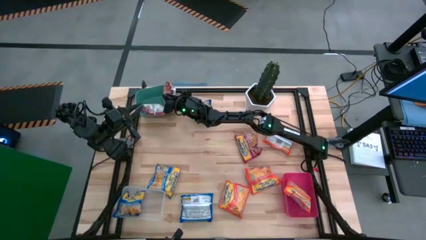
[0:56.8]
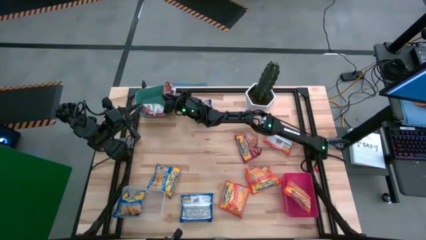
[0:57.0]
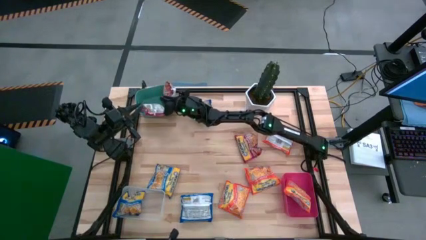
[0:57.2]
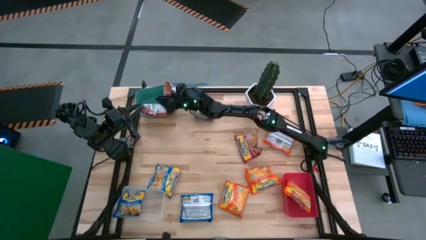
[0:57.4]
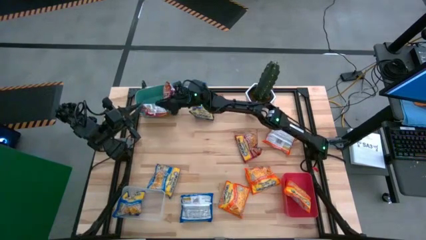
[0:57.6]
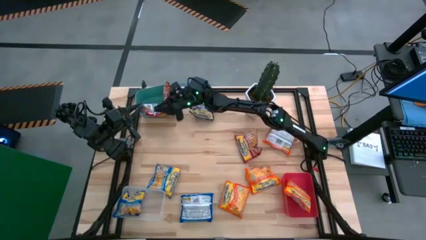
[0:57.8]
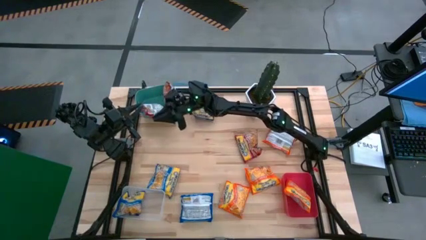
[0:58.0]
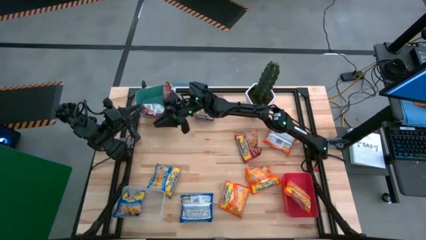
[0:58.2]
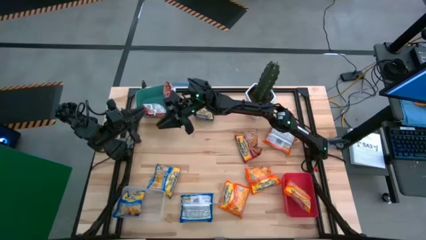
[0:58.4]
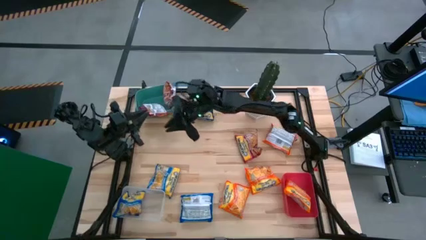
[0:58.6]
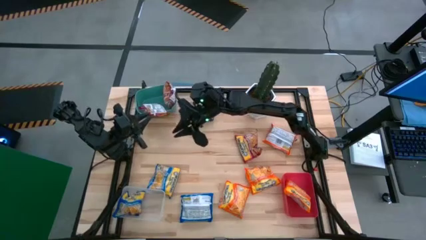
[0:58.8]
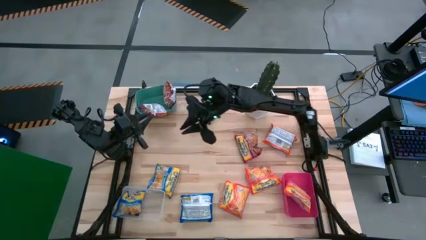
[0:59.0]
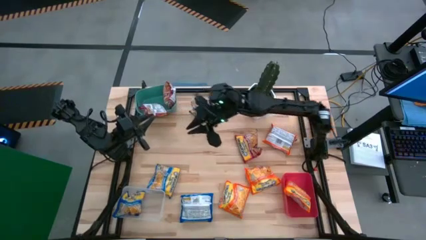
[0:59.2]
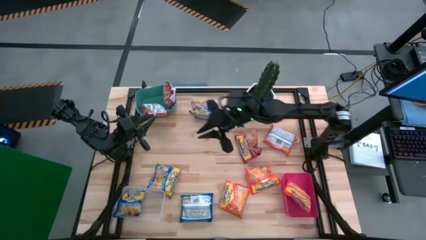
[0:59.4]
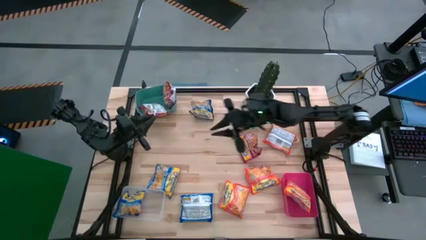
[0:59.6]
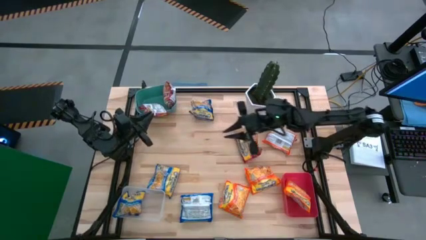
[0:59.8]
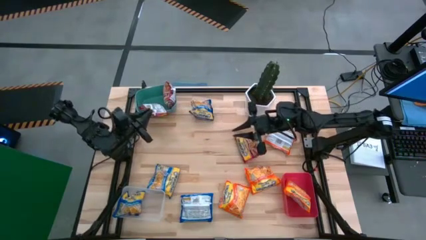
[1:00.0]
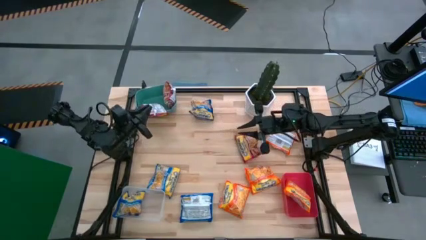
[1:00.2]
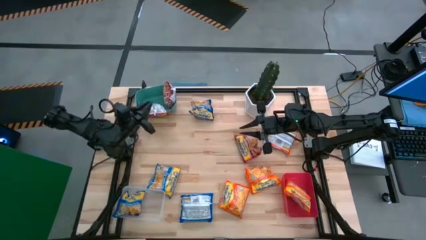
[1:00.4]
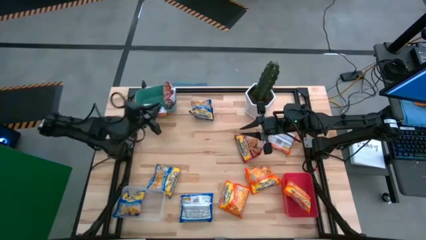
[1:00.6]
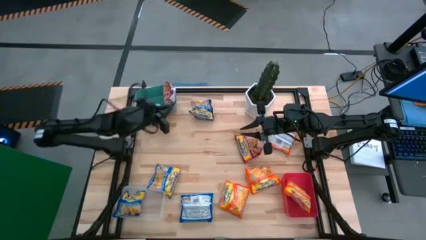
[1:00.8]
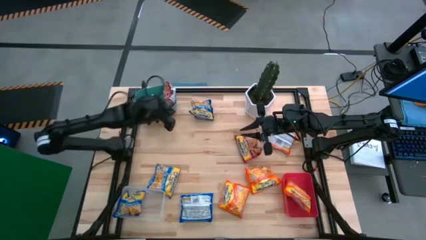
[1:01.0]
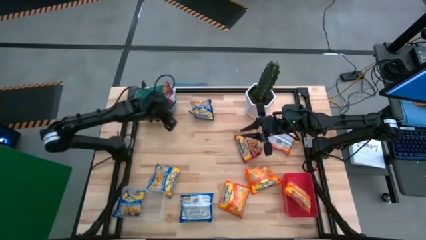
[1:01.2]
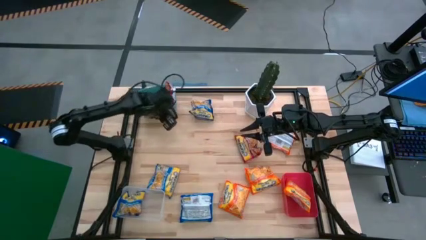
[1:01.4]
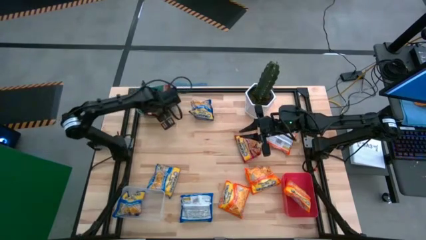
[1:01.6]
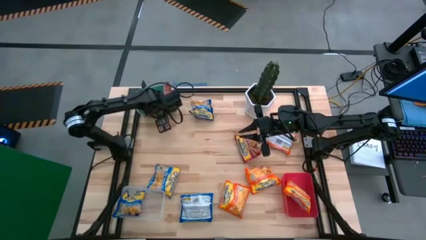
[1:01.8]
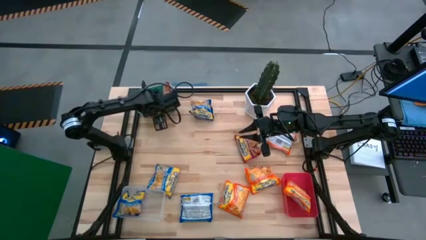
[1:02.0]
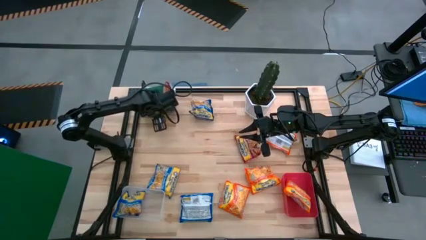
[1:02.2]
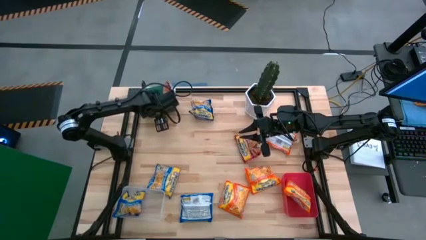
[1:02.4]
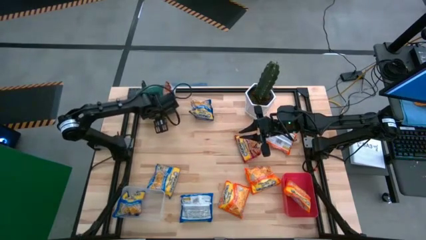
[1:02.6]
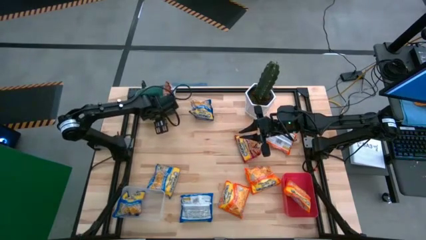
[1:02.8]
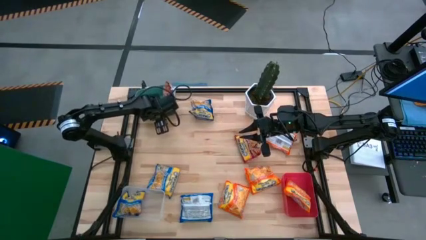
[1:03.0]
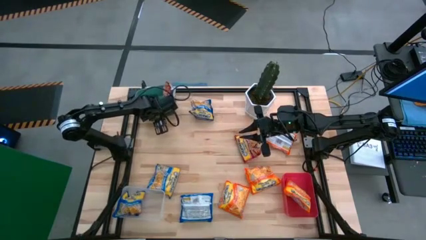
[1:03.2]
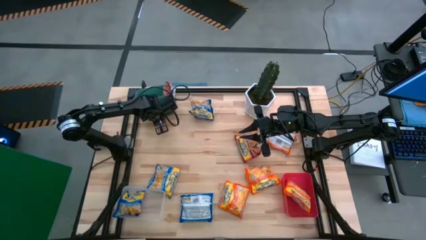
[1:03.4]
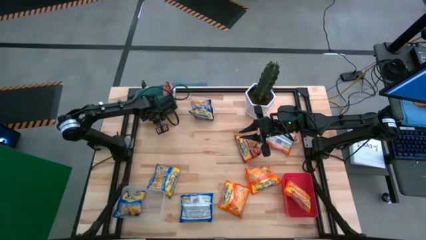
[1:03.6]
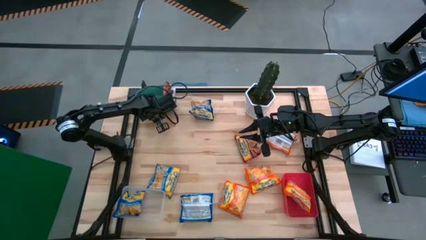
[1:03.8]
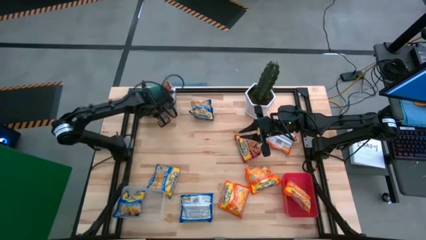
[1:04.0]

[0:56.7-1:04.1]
Task: Sort Maruchan noodles
Adjust the red noodle pack on the green bin

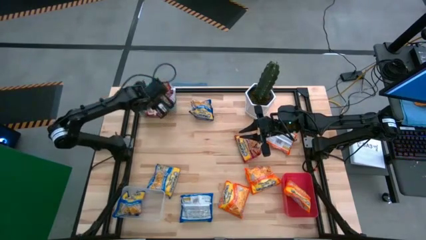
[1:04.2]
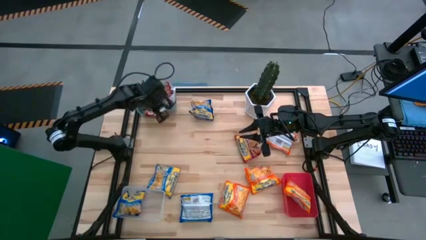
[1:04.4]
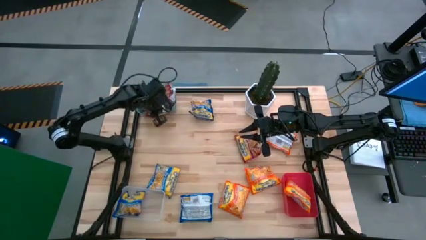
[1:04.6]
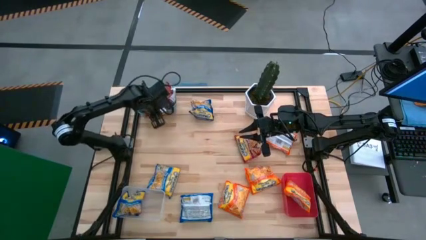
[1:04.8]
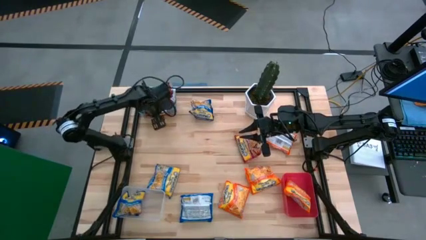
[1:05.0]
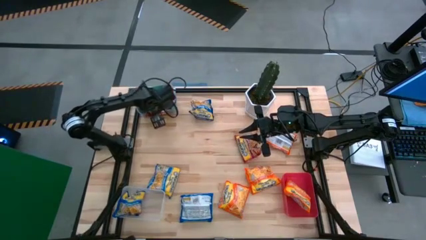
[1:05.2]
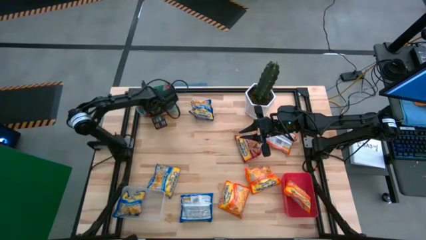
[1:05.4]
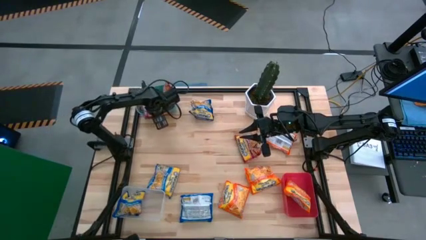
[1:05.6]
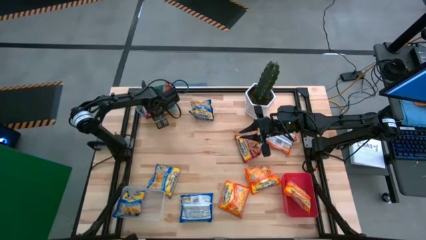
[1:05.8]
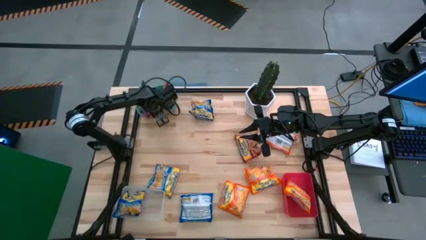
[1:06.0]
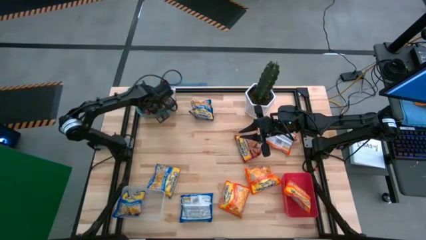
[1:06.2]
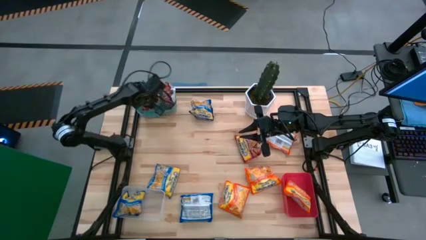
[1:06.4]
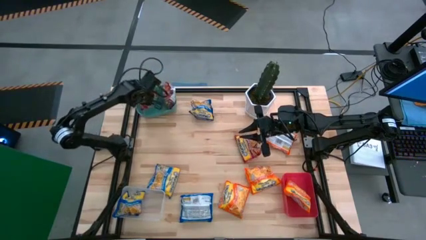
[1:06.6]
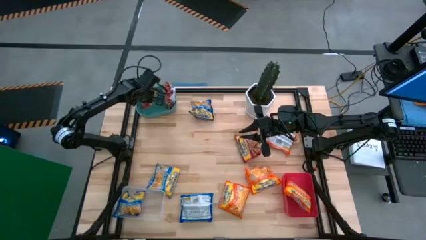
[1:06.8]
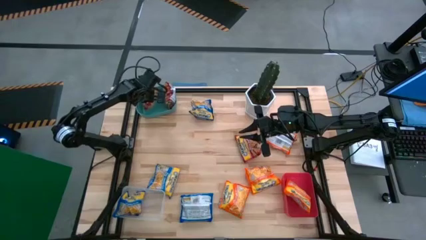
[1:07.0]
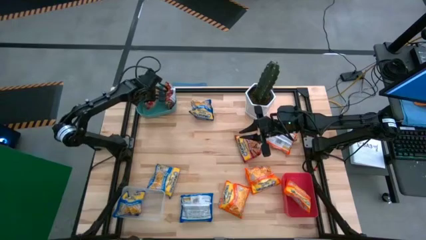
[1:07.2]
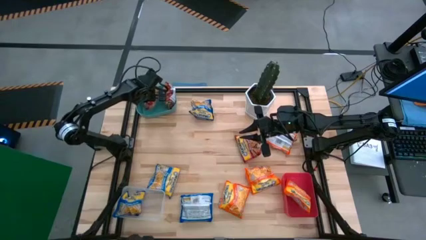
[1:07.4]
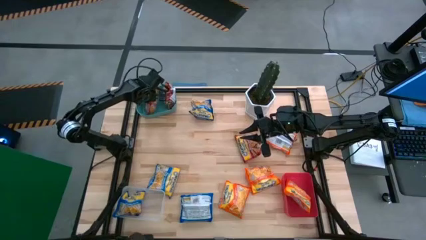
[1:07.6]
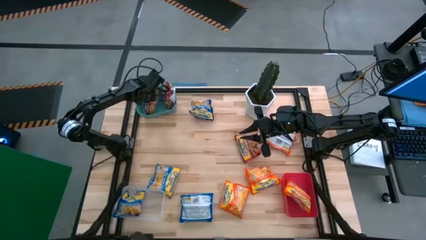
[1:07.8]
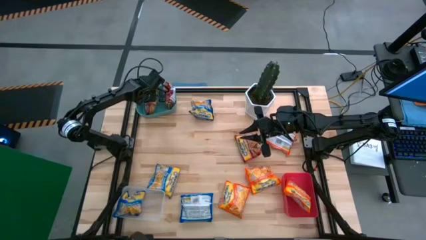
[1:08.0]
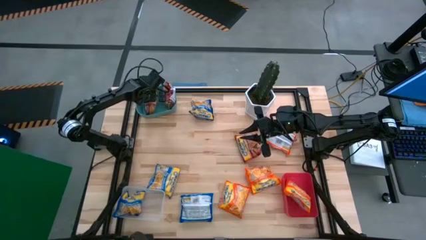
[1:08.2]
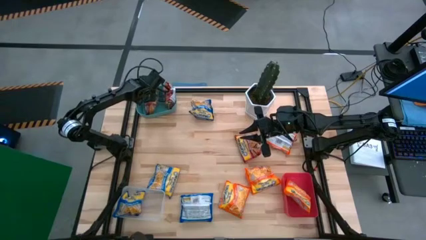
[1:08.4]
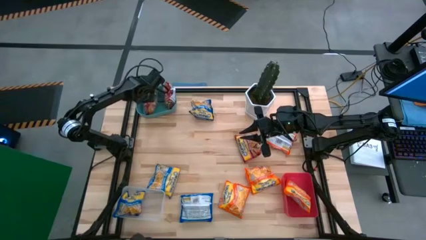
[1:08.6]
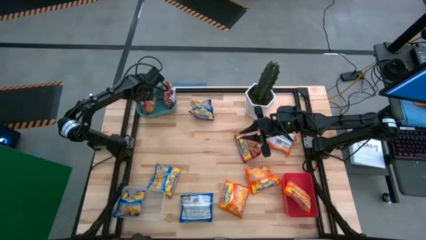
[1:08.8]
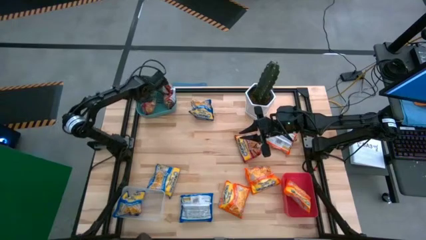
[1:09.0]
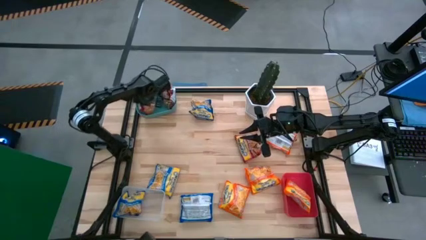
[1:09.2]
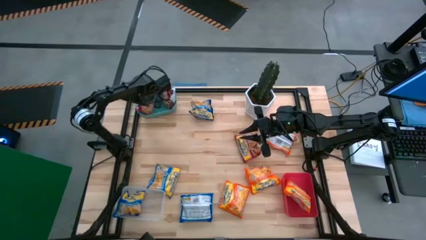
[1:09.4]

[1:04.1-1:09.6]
Adjust the red noodle pack on the green bin

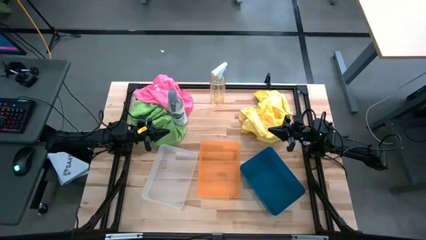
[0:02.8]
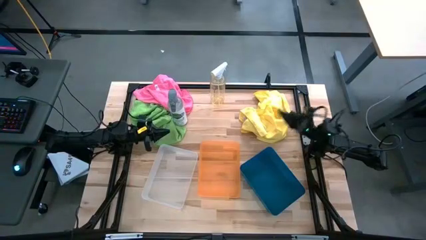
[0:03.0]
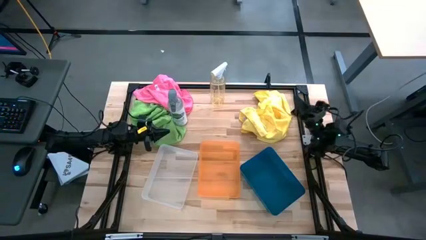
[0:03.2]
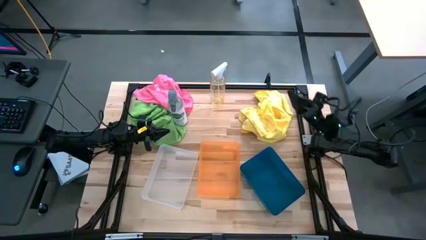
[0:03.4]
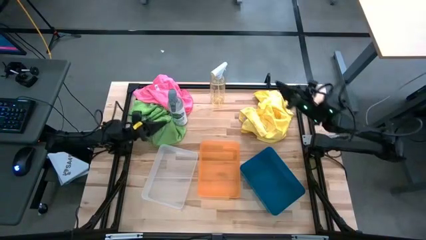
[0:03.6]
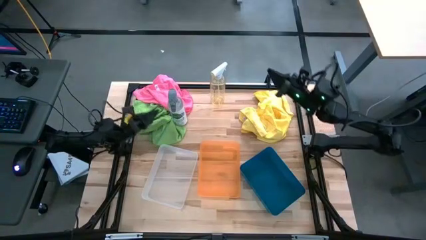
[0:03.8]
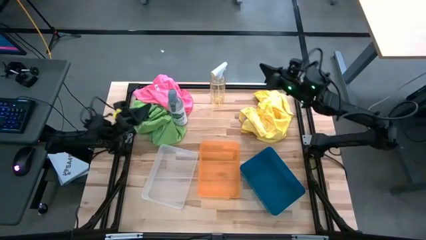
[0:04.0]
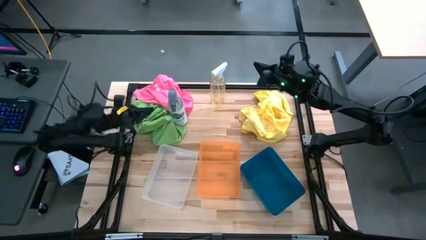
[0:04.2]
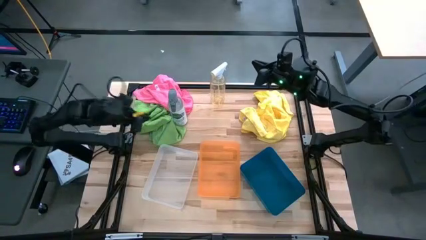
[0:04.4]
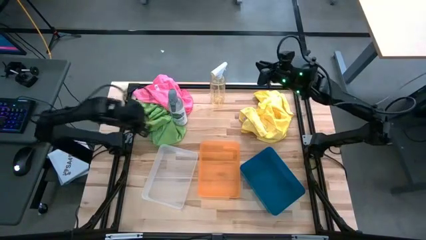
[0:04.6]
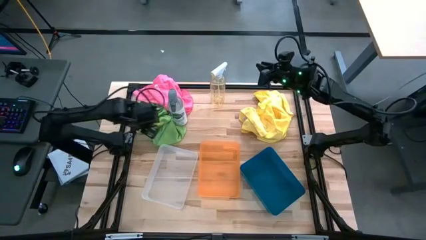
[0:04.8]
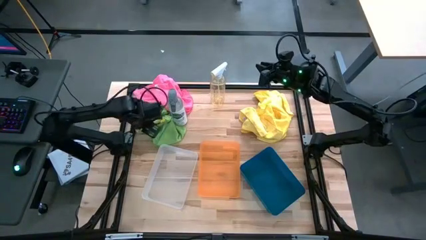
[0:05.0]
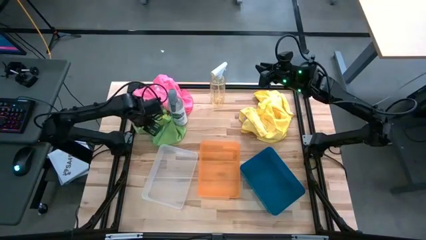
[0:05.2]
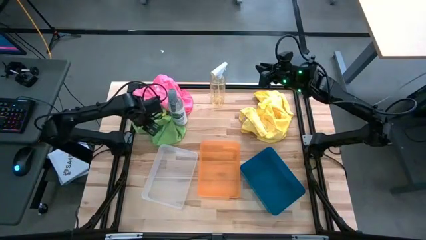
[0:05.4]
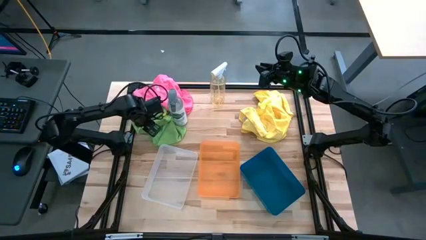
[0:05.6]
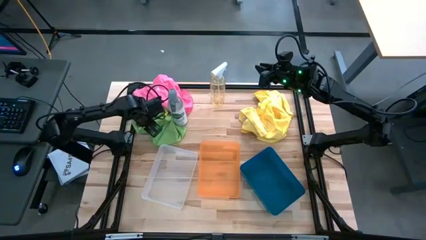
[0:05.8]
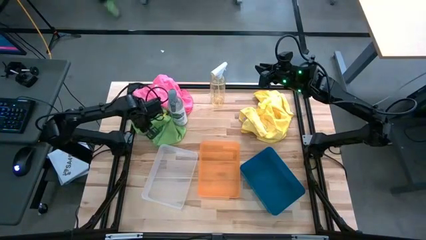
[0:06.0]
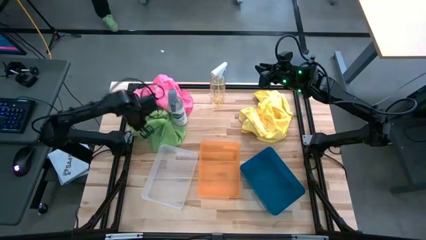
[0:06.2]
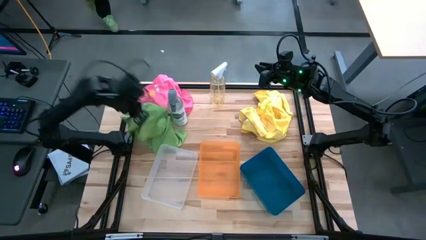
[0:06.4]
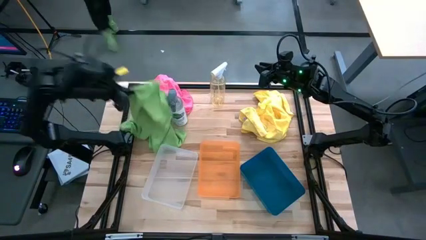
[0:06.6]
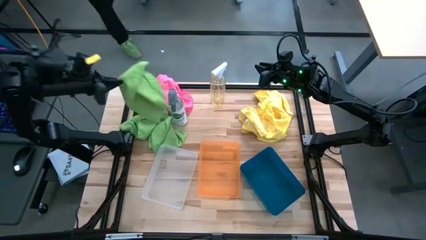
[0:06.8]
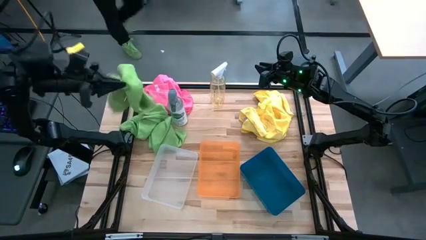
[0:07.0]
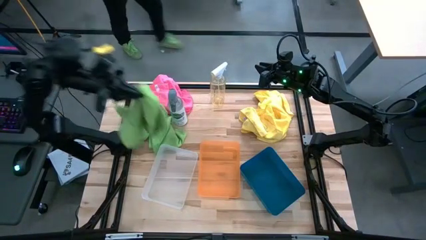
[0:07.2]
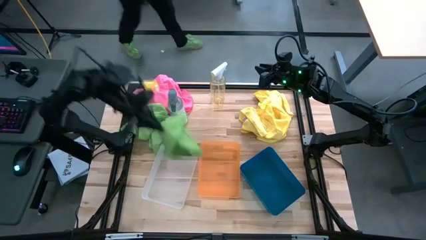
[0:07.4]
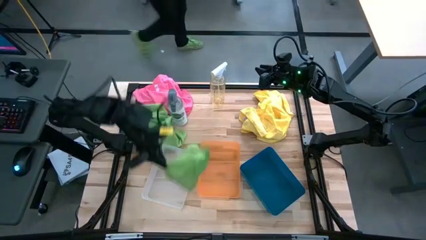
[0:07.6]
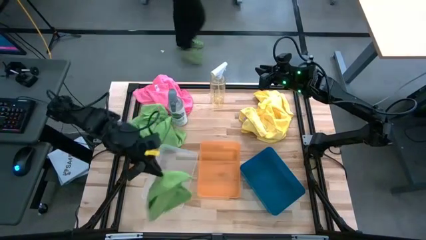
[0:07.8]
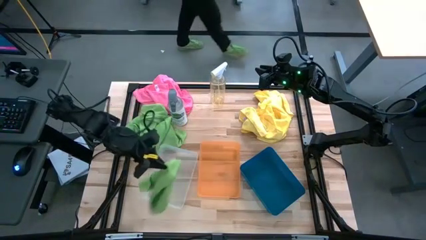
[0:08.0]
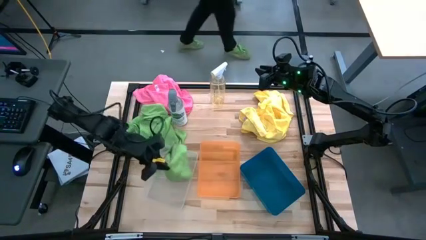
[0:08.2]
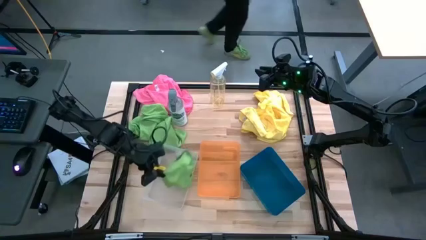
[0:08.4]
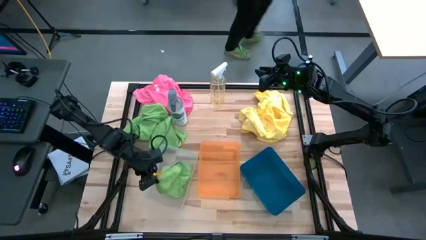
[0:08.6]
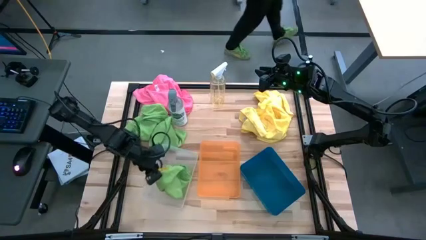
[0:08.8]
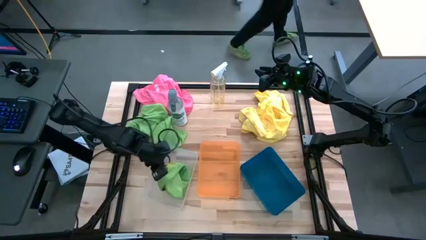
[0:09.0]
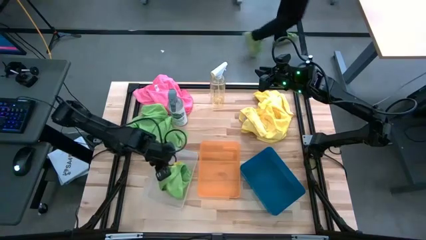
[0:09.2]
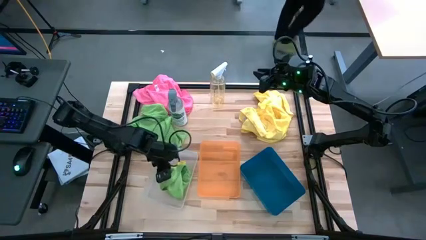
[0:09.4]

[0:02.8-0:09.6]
Task: Sort microfiber towel by color & place in baskets
Put the green towel into the white bin
